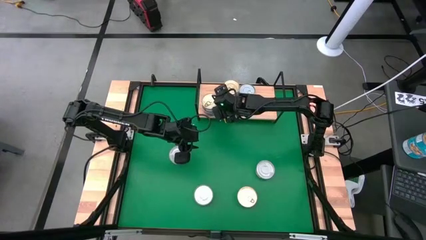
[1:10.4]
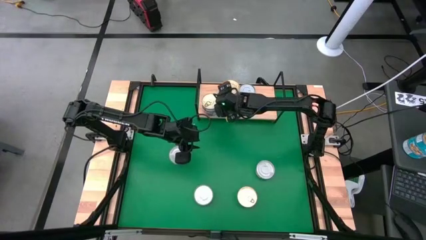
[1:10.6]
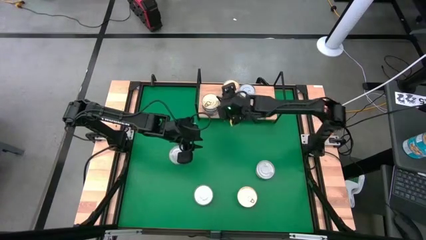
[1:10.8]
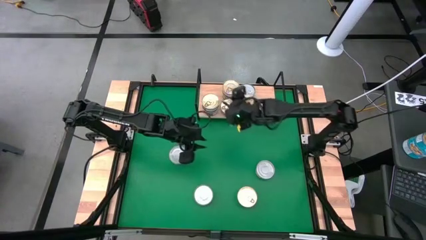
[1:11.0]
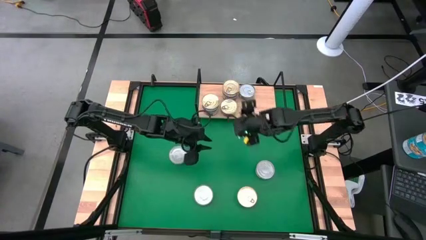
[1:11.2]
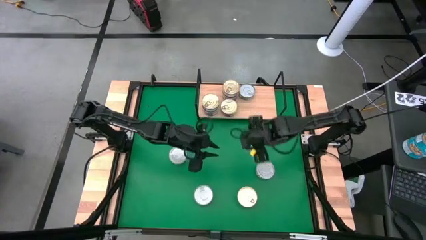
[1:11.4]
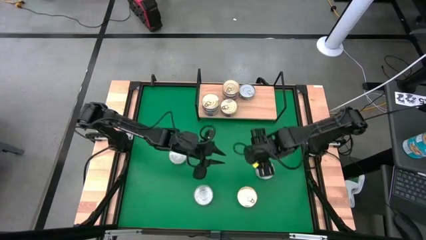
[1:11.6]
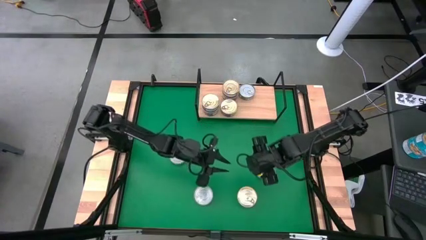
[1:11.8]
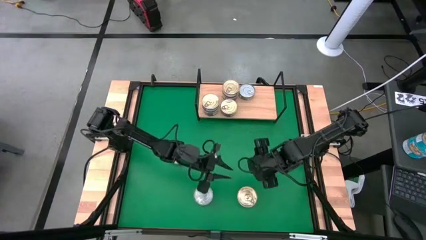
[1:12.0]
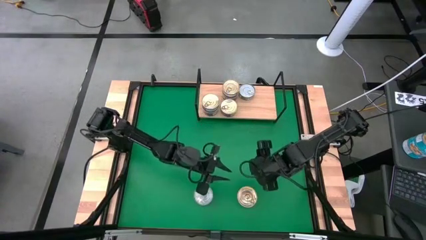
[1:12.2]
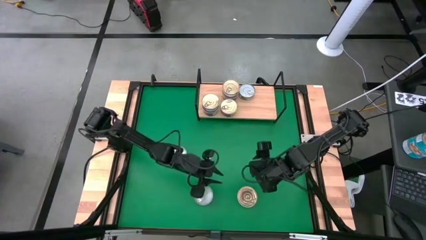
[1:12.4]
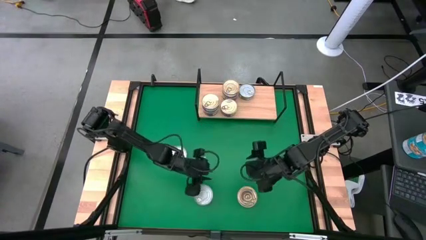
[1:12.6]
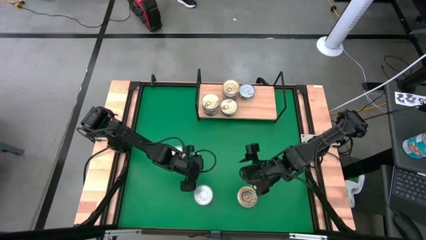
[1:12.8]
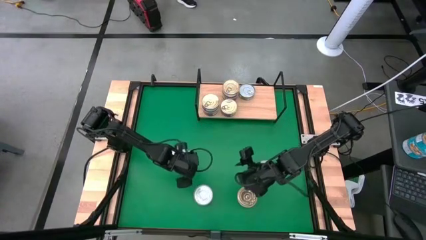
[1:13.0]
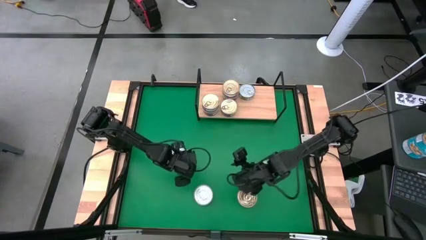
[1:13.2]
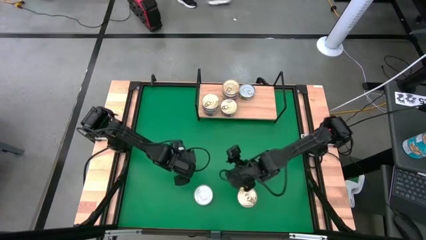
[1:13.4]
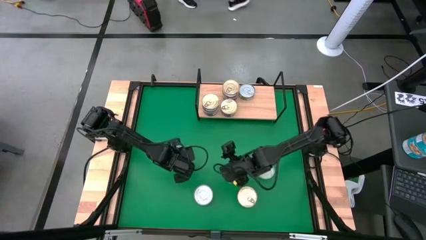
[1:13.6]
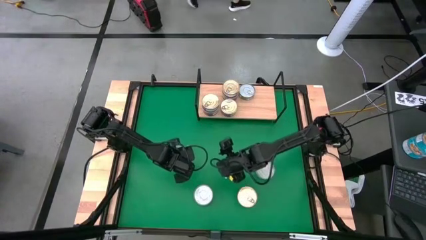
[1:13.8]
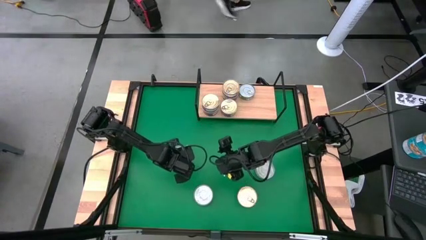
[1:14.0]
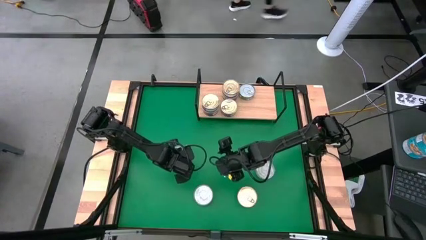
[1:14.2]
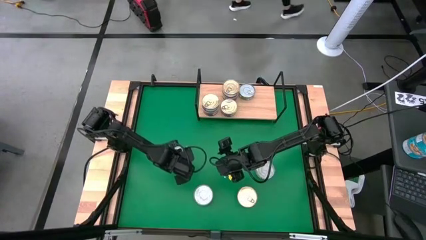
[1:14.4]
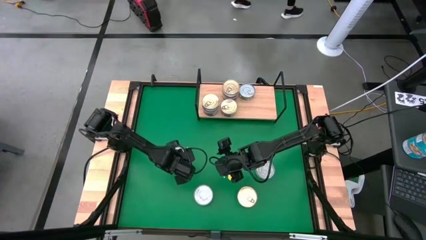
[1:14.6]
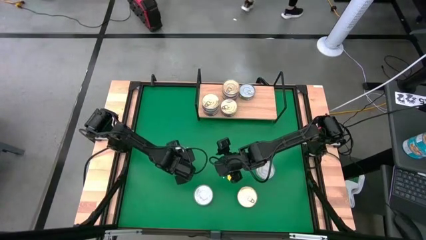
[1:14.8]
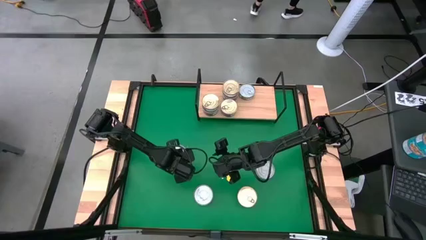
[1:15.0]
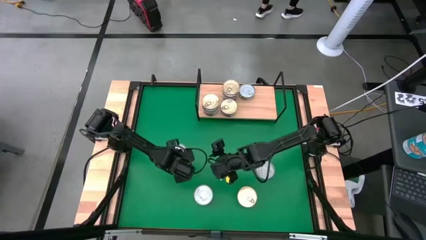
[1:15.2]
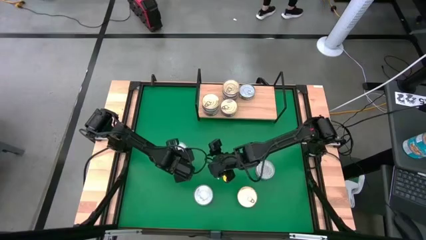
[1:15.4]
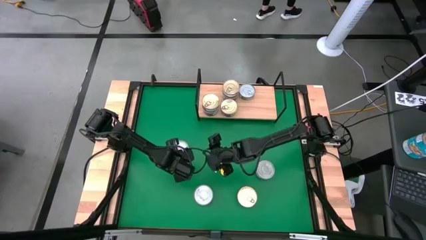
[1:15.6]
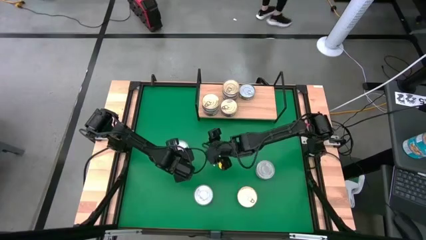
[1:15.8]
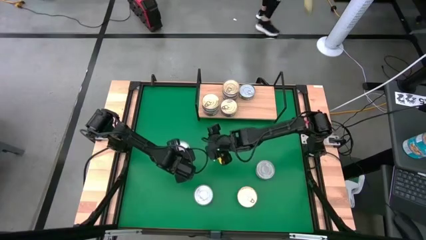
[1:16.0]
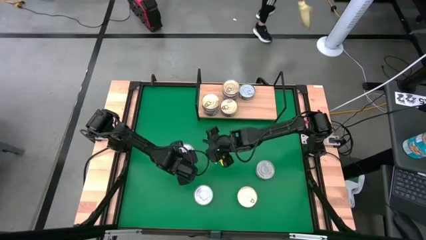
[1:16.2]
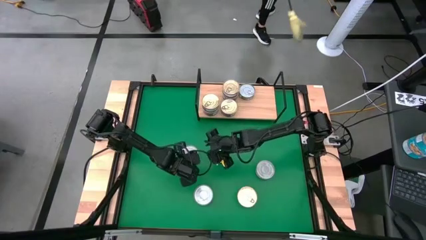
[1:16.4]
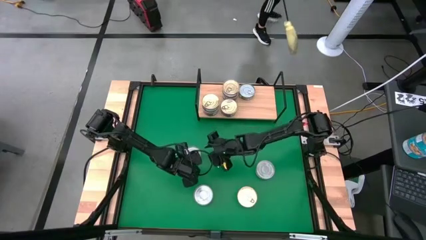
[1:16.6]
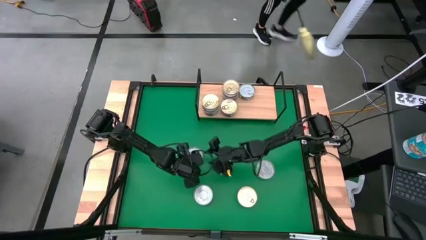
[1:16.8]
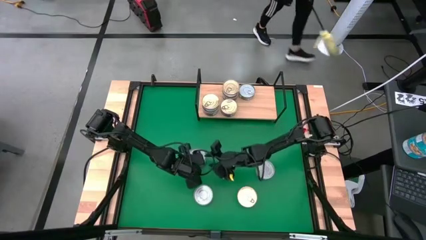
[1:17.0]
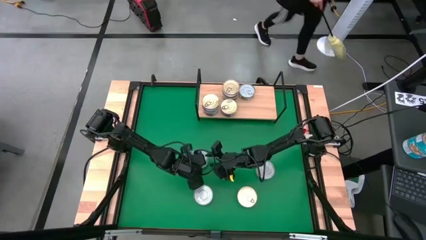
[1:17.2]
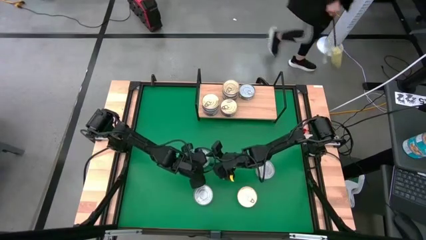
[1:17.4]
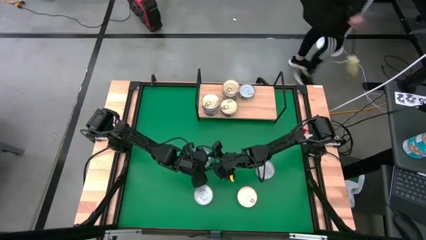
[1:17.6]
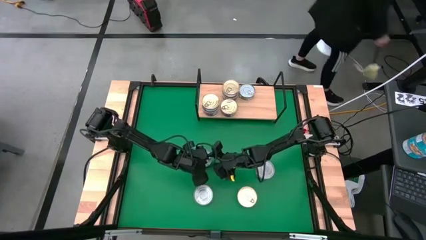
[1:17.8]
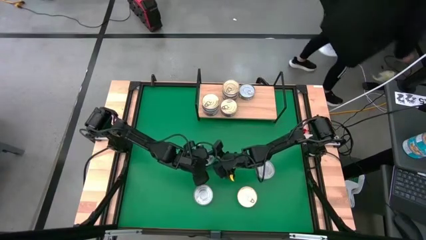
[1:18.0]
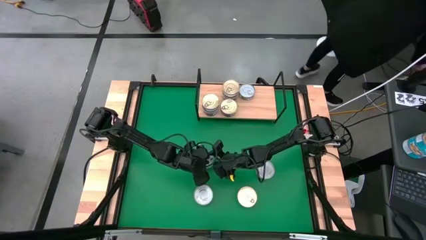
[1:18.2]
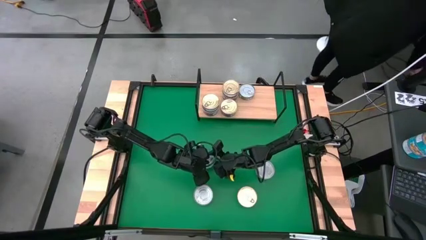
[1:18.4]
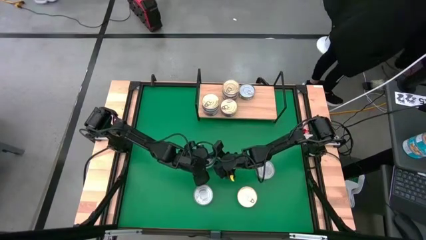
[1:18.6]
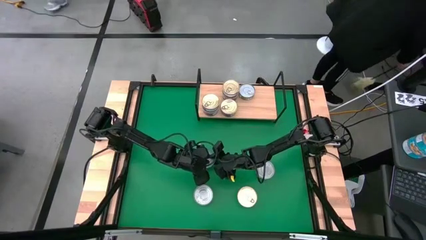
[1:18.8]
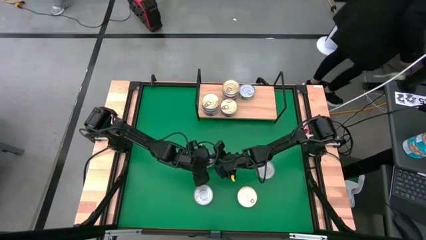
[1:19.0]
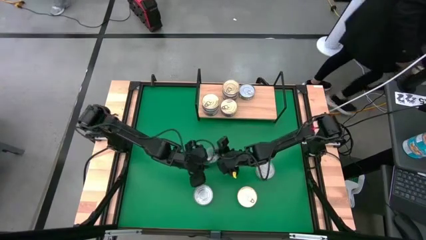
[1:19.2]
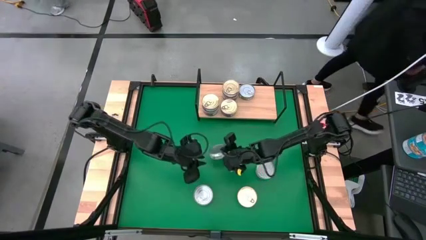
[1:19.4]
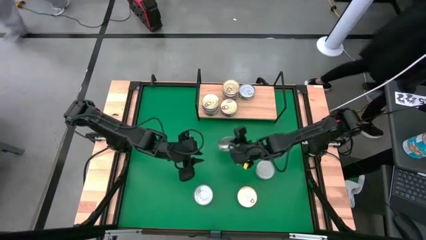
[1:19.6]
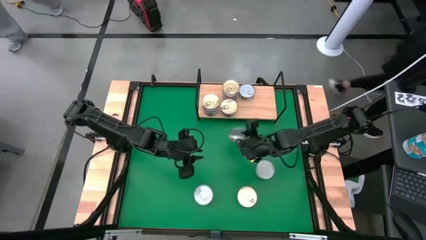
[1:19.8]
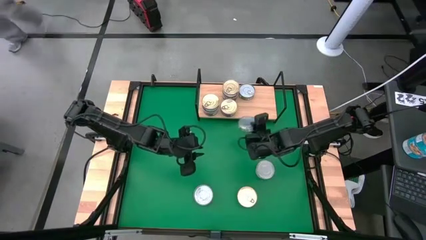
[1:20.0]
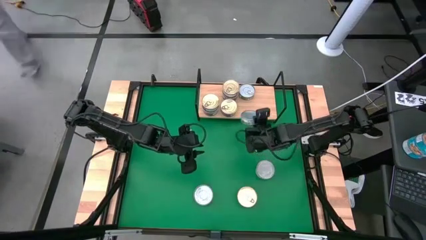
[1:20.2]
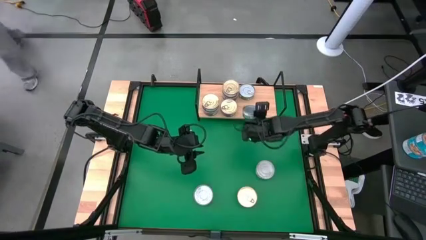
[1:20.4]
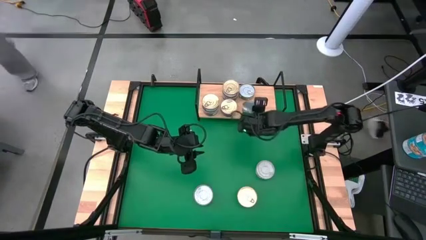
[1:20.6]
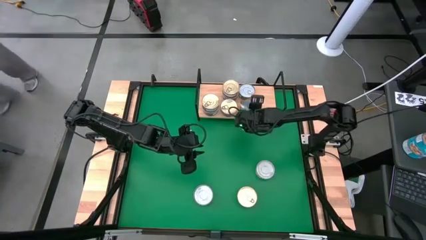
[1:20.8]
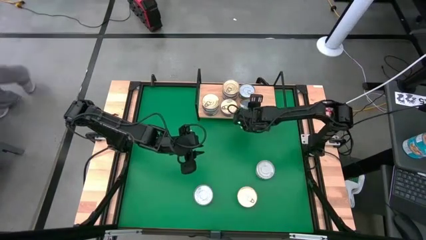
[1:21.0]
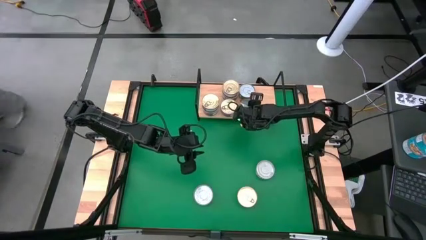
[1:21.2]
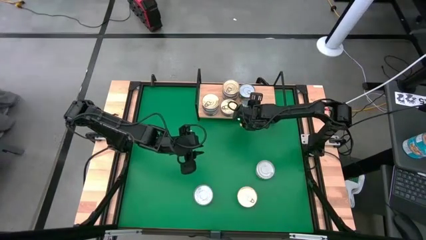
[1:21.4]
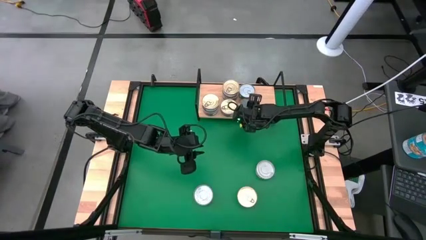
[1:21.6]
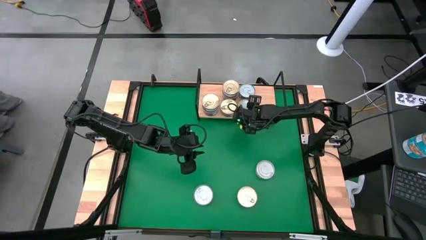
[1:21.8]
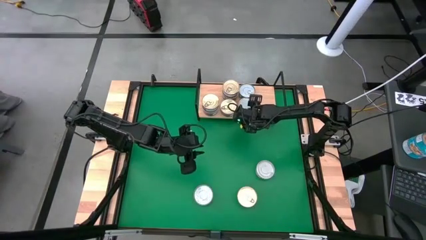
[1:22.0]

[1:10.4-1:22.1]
Task: Stack canned seafood by type on shelf
Put the green tuna can on the shelf aligned with the blue tuna can

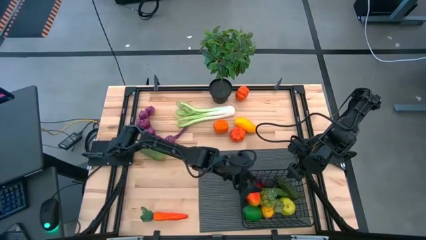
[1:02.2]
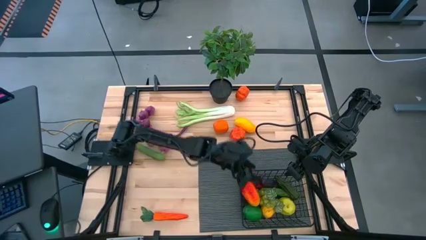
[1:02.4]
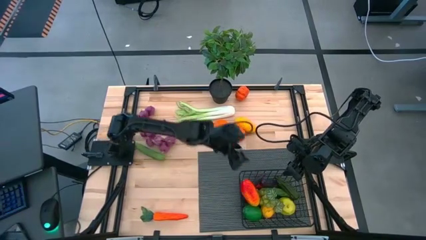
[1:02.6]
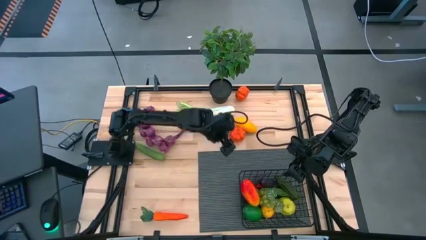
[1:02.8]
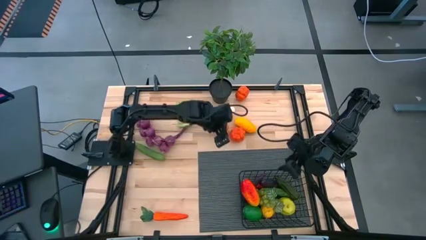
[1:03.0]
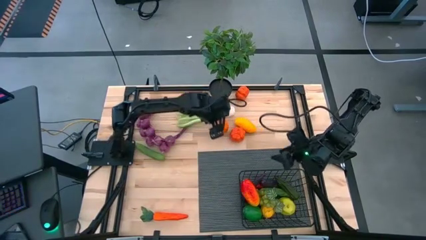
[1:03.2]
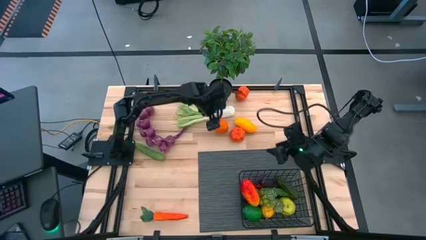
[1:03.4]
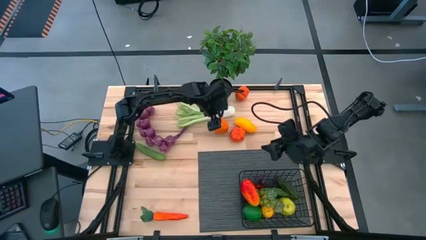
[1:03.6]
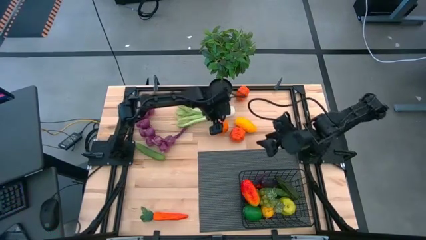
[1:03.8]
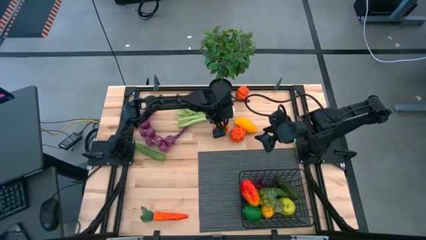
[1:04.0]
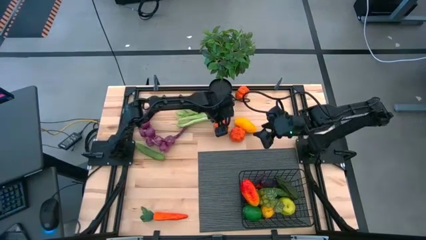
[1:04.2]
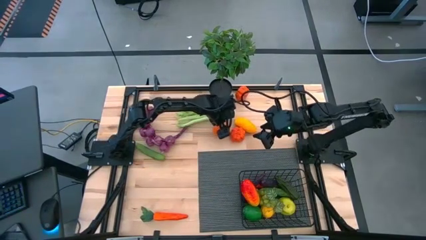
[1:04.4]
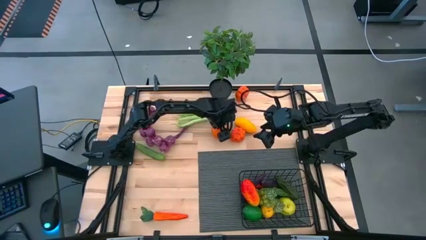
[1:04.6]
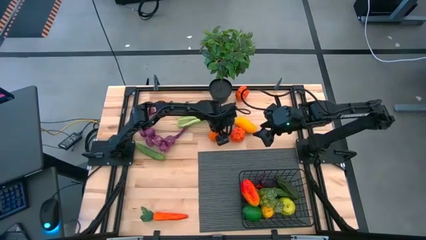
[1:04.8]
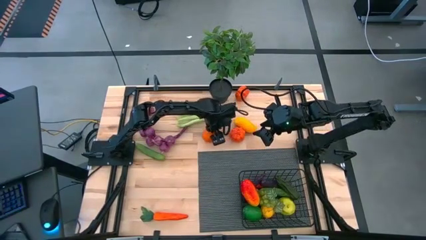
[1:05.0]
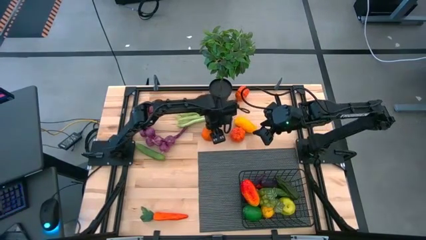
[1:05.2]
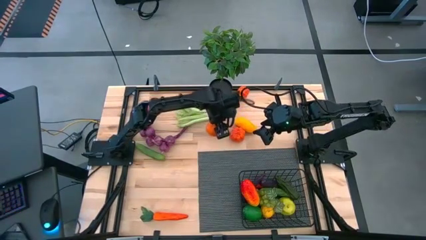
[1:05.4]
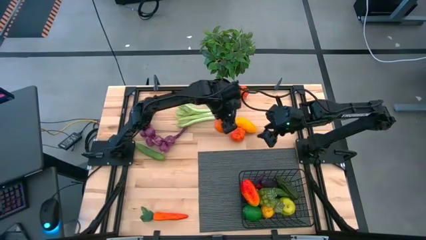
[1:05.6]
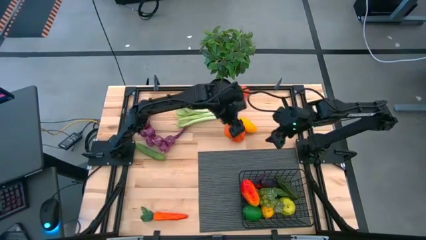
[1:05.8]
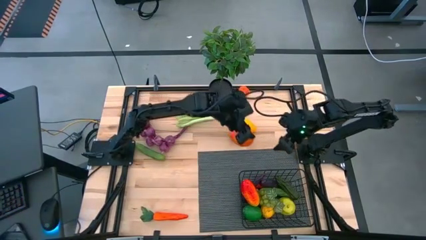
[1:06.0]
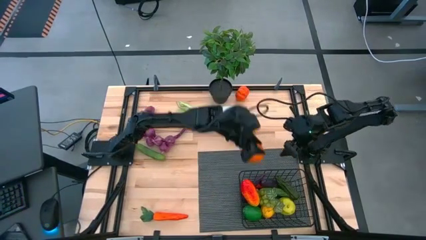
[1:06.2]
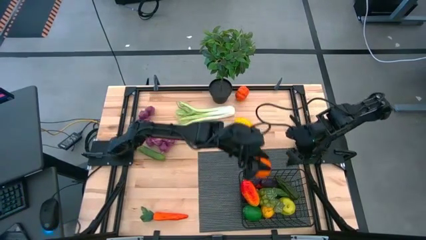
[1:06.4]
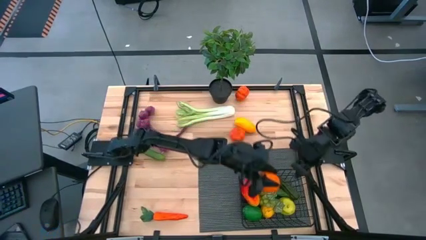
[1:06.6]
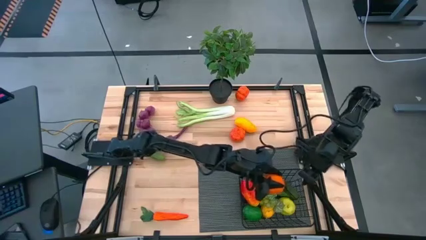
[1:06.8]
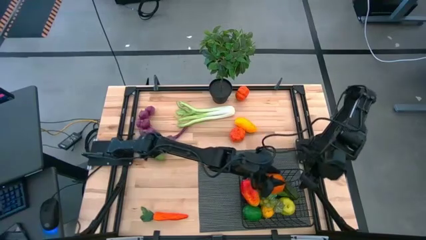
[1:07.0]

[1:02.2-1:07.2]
Task: Build produce basket
Put the orange into the black wire basket

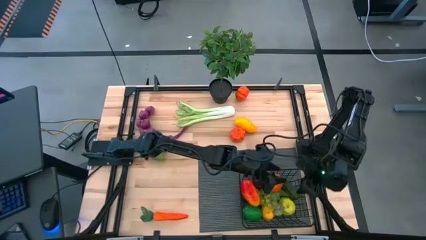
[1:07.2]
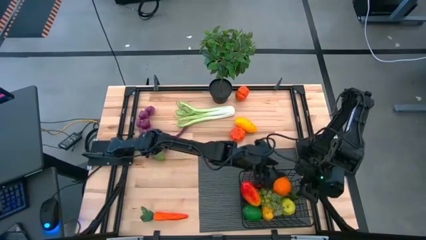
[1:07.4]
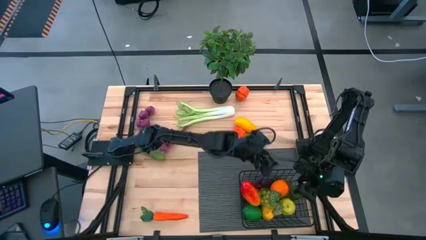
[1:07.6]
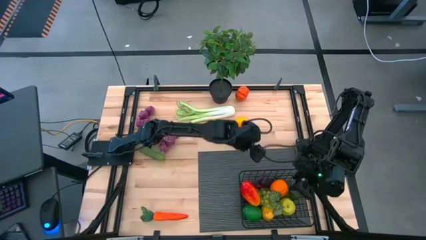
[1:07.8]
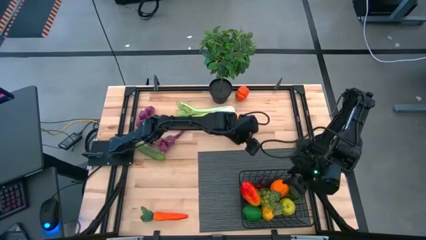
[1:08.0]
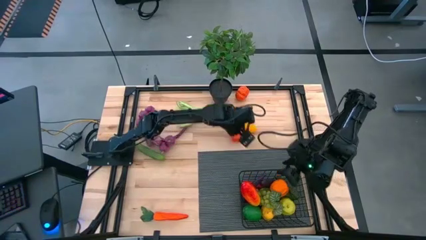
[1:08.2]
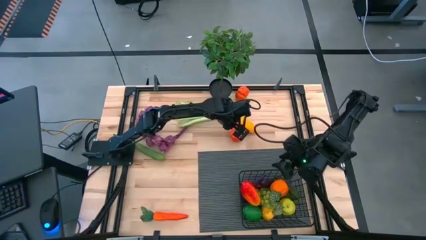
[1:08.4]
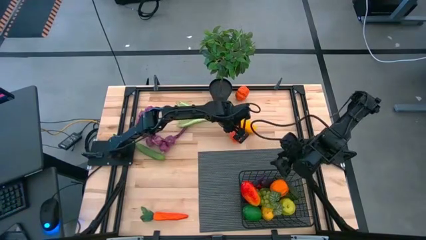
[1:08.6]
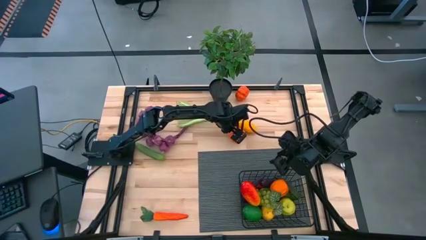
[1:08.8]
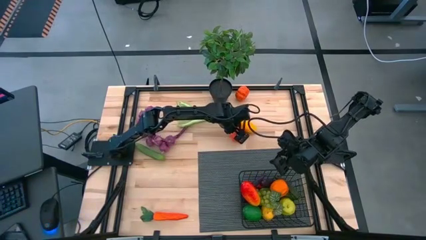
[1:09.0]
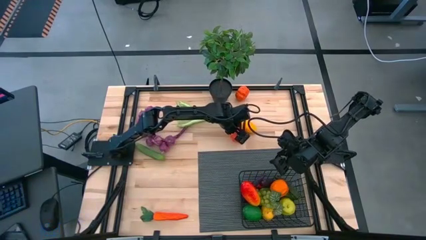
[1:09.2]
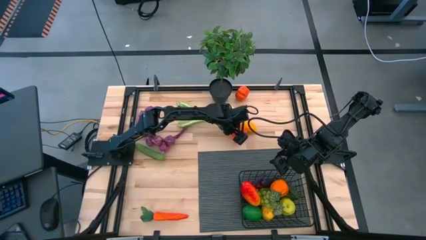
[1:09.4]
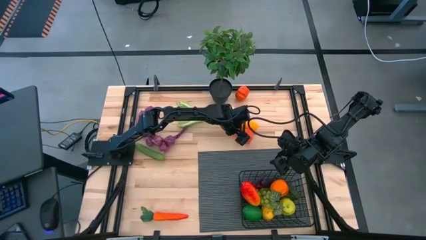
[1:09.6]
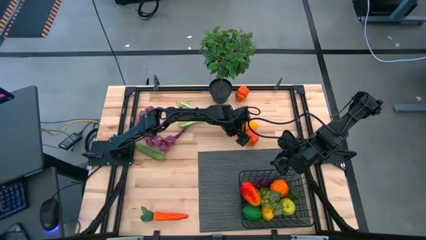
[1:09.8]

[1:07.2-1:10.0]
Put the bottom orange pumpkin into the black wire basket
